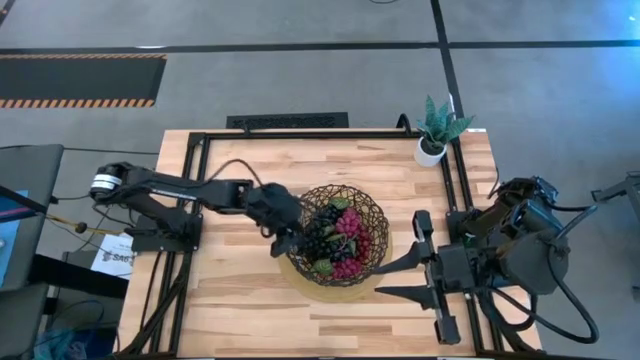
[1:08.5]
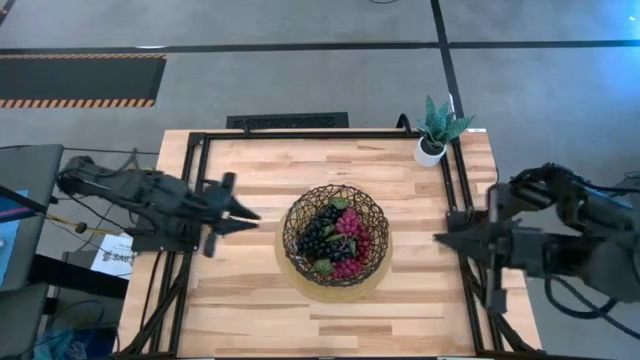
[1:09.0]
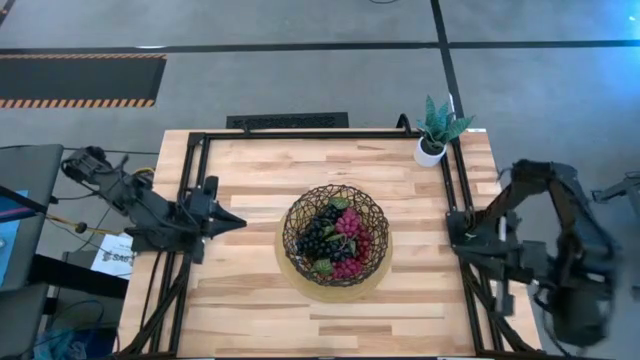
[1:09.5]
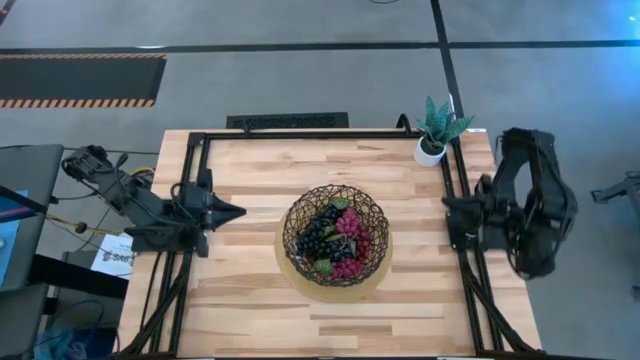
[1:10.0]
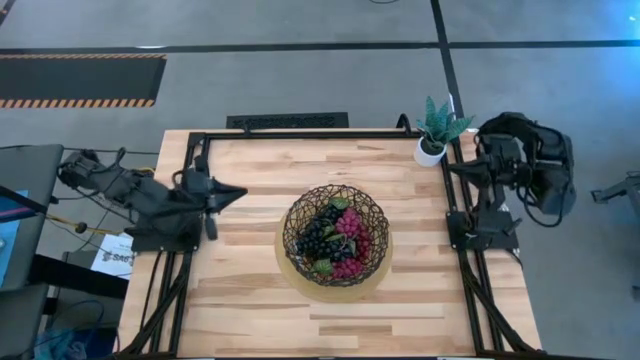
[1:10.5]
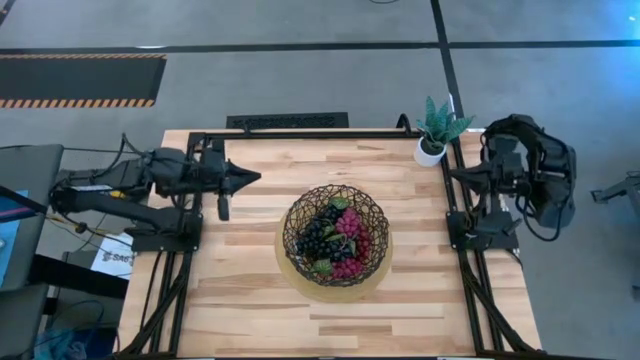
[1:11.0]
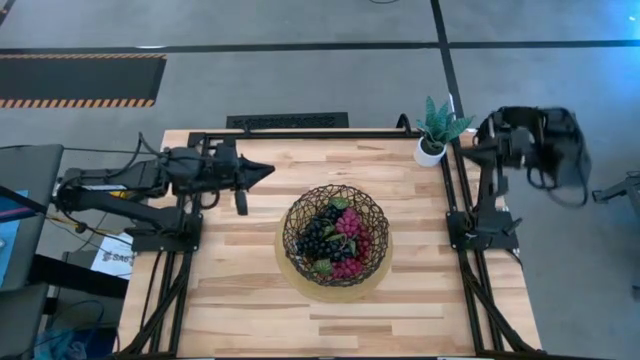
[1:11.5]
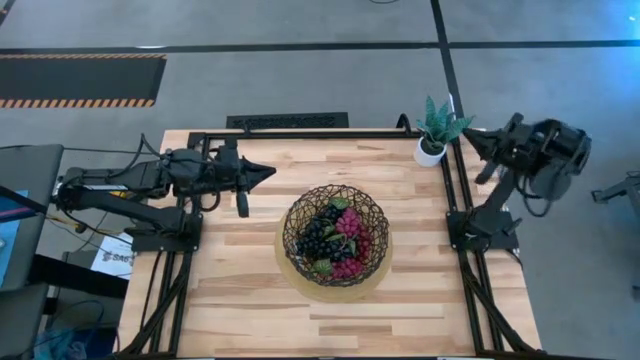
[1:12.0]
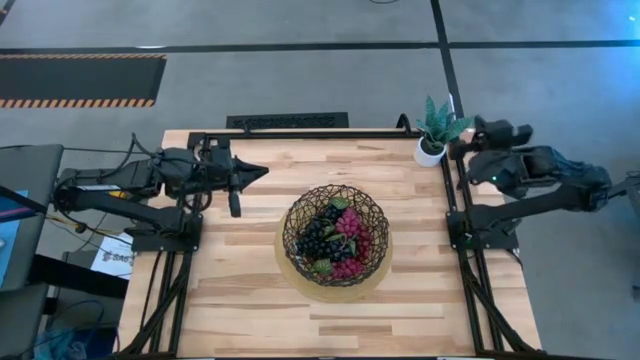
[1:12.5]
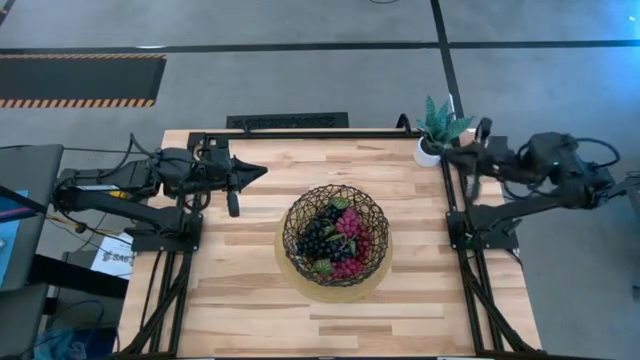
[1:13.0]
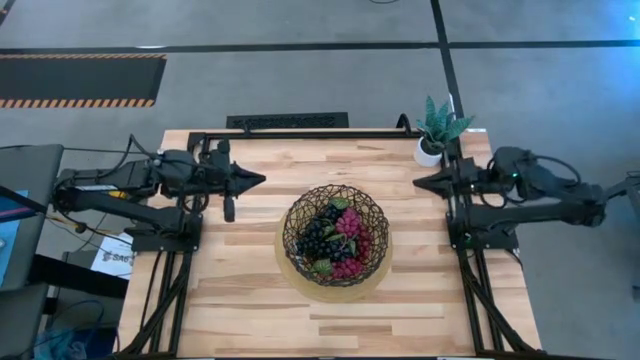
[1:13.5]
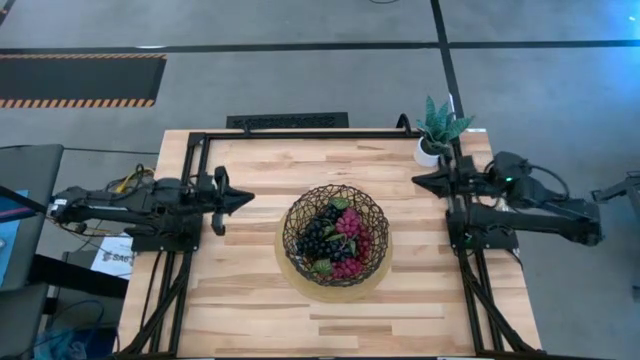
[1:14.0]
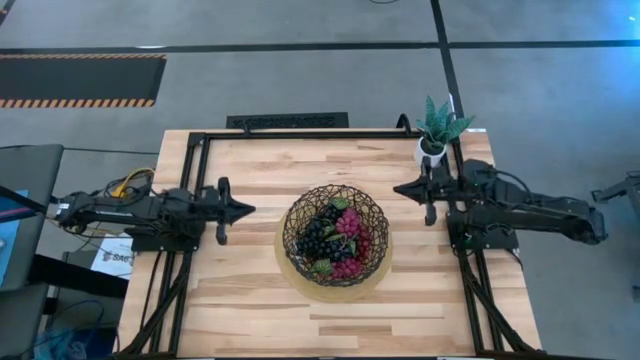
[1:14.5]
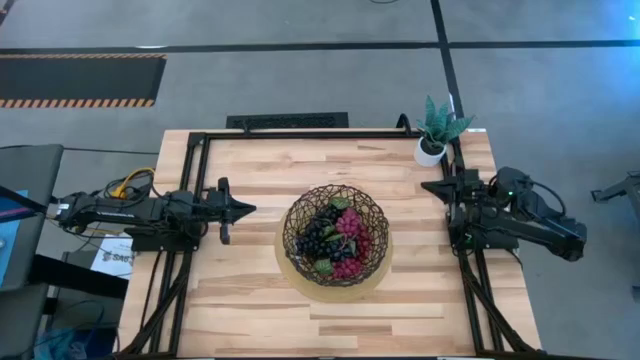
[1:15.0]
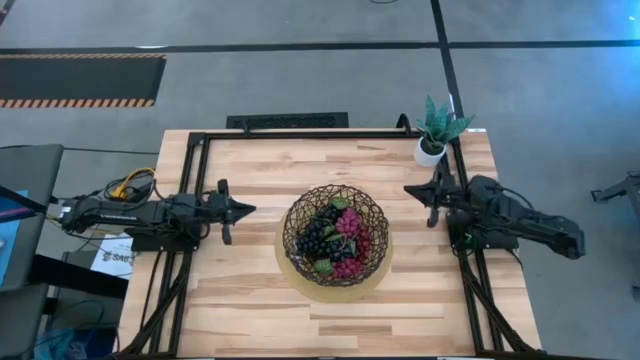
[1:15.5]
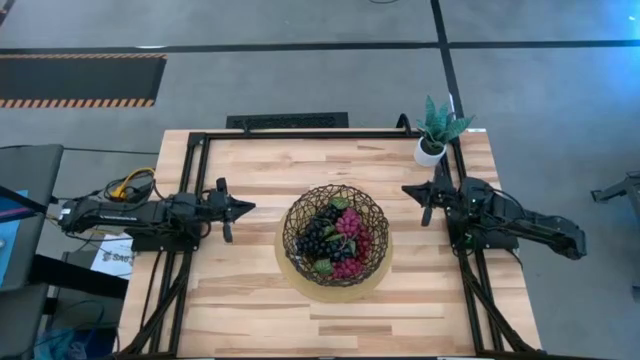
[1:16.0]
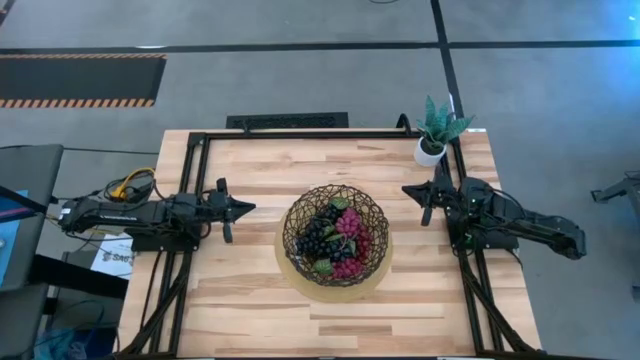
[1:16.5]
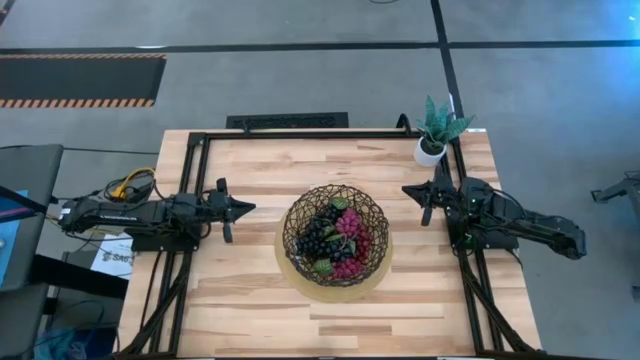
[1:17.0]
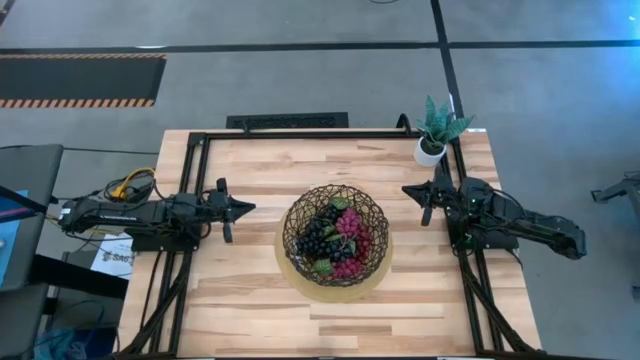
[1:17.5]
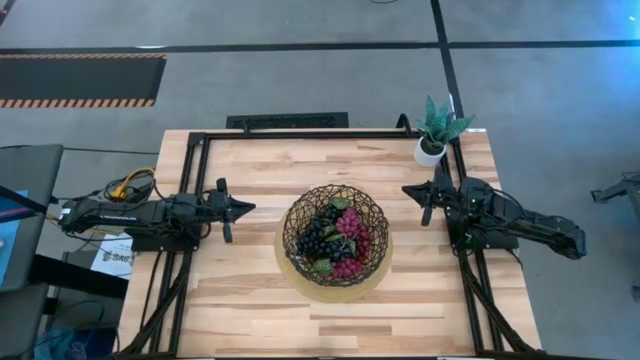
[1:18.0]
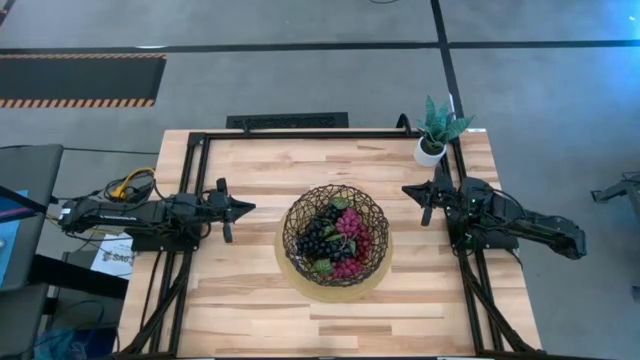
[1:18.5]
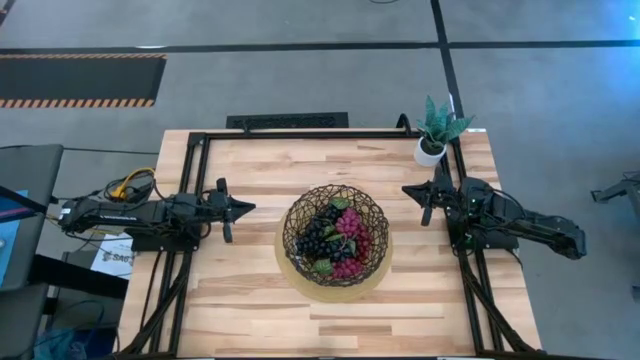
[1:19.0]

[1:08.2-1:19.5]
Task: Build produce basket
Return to Home Position

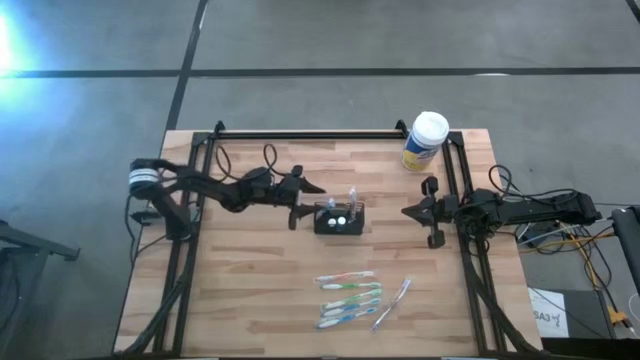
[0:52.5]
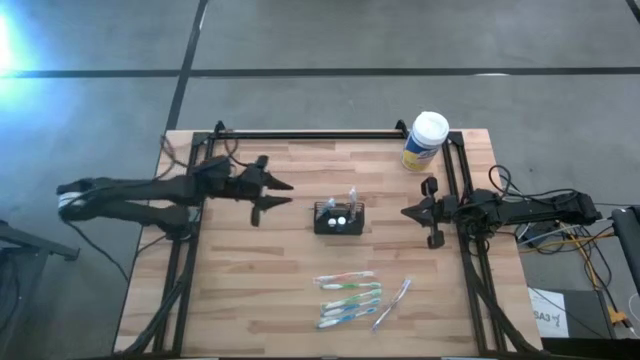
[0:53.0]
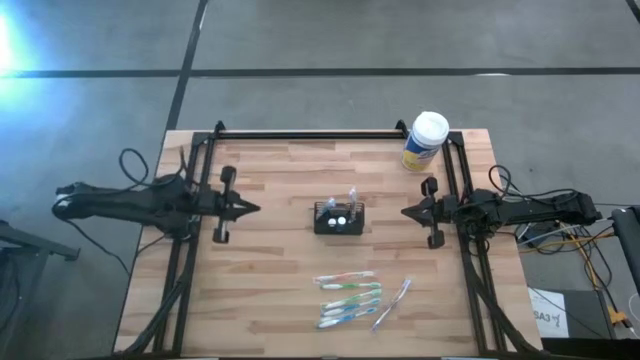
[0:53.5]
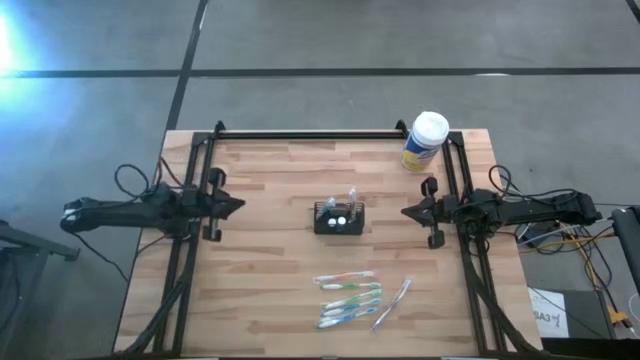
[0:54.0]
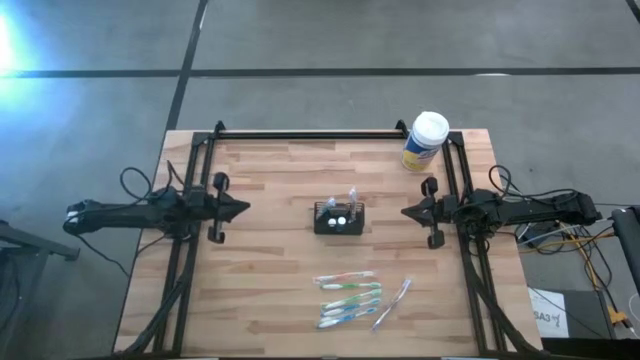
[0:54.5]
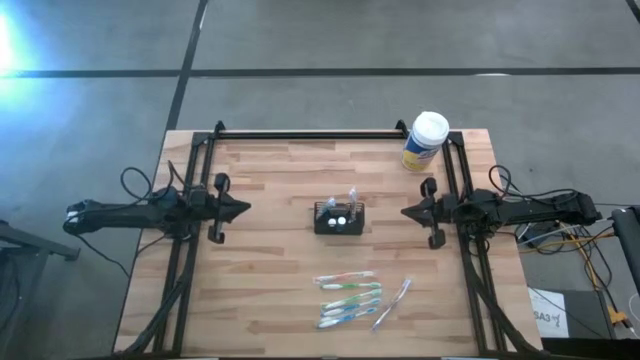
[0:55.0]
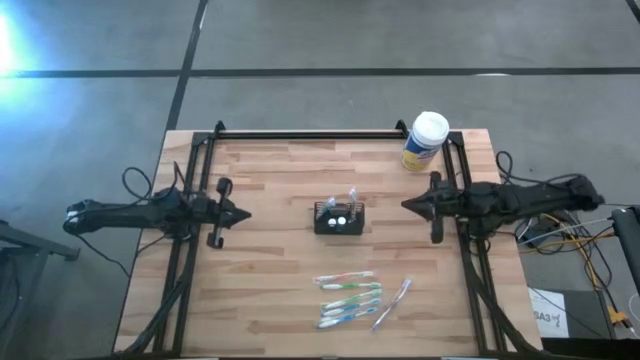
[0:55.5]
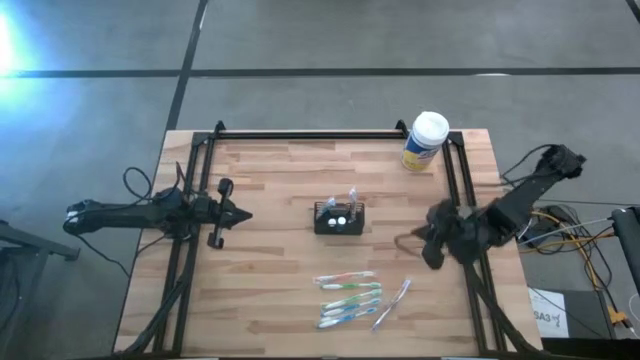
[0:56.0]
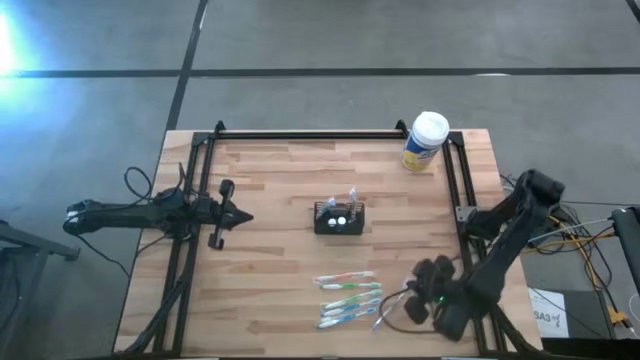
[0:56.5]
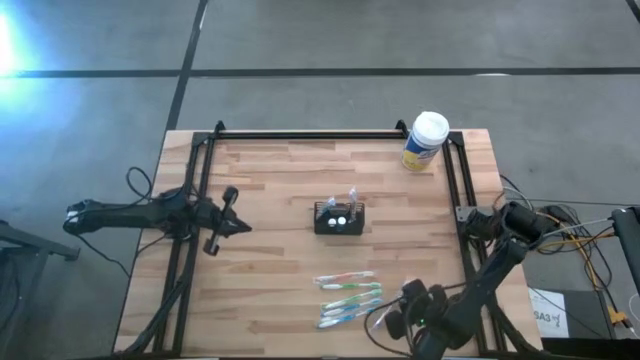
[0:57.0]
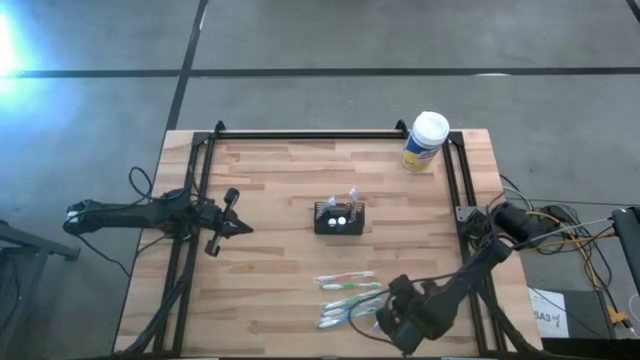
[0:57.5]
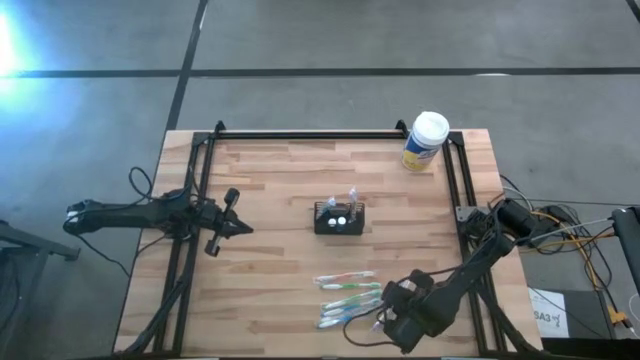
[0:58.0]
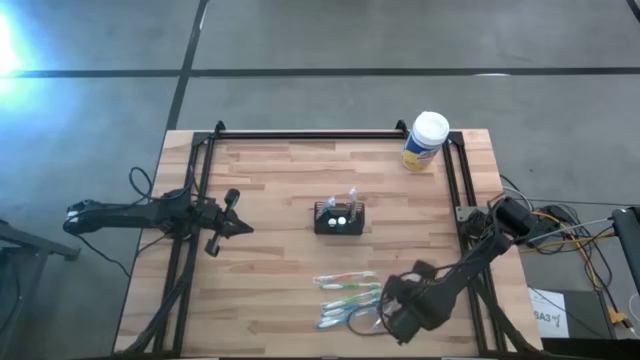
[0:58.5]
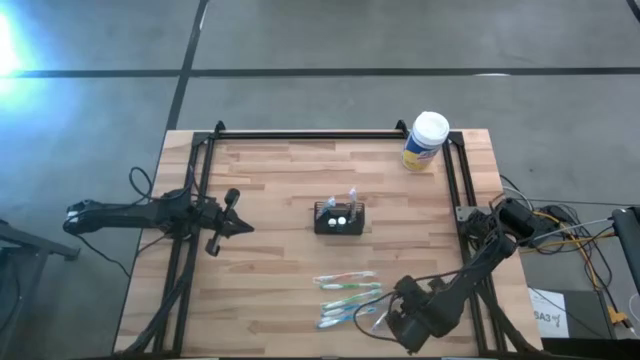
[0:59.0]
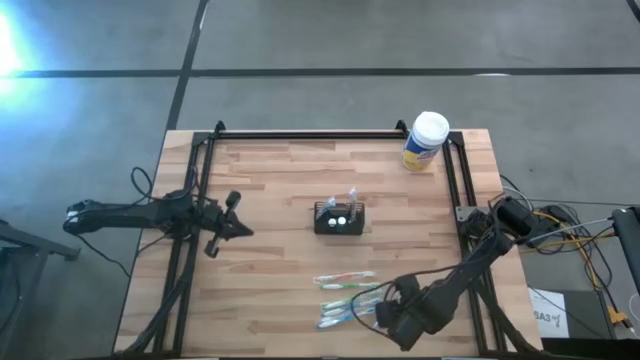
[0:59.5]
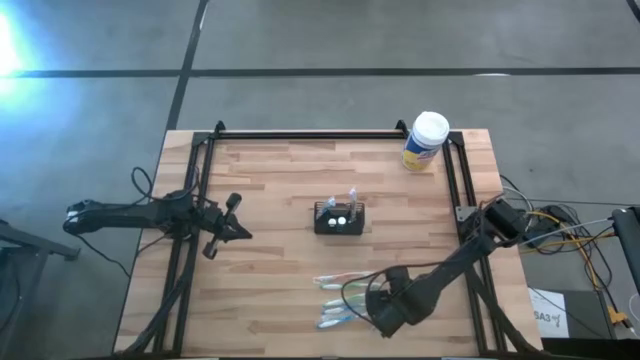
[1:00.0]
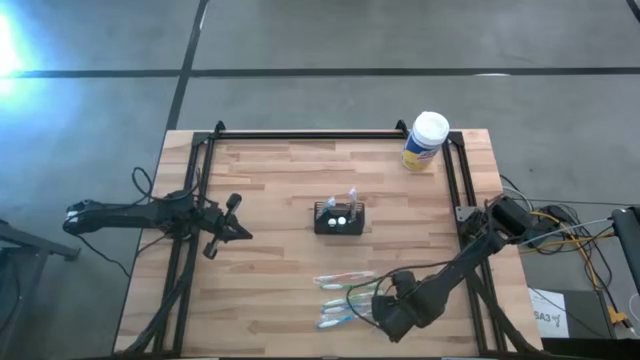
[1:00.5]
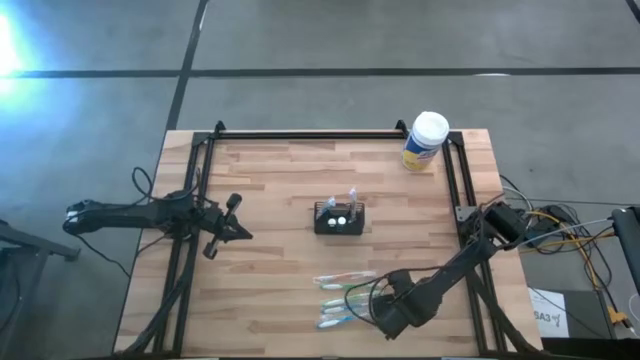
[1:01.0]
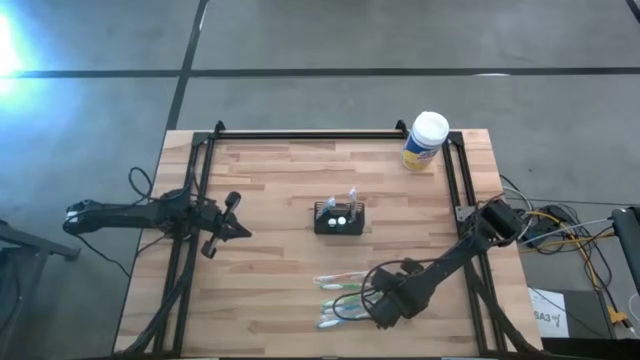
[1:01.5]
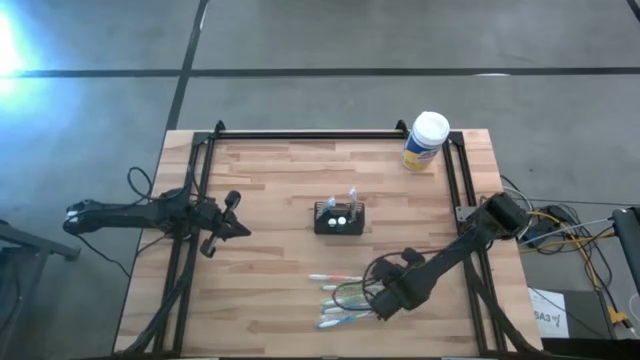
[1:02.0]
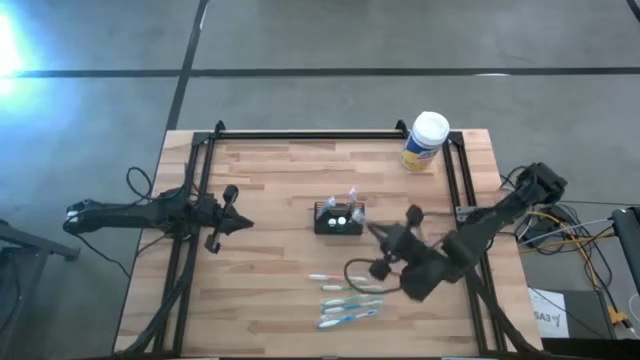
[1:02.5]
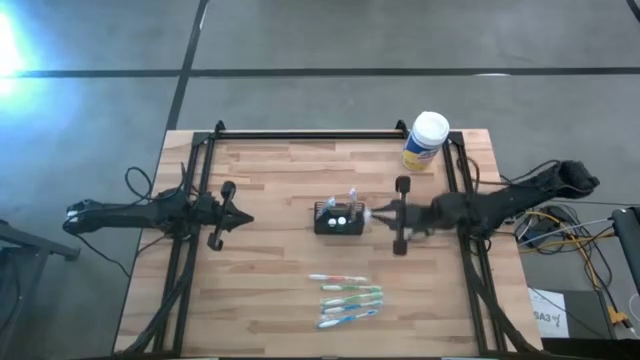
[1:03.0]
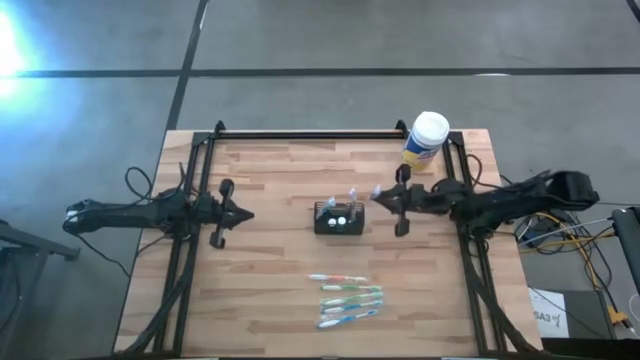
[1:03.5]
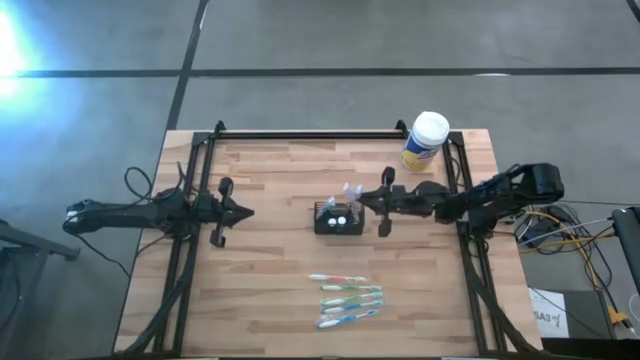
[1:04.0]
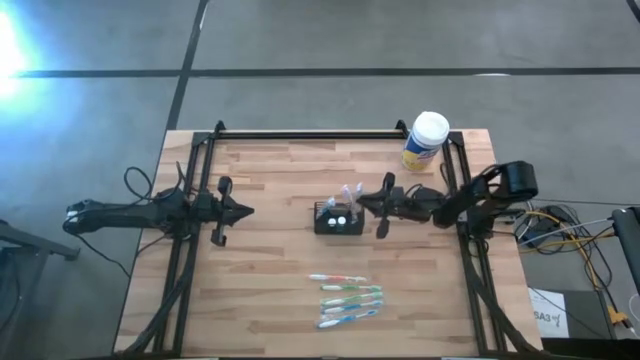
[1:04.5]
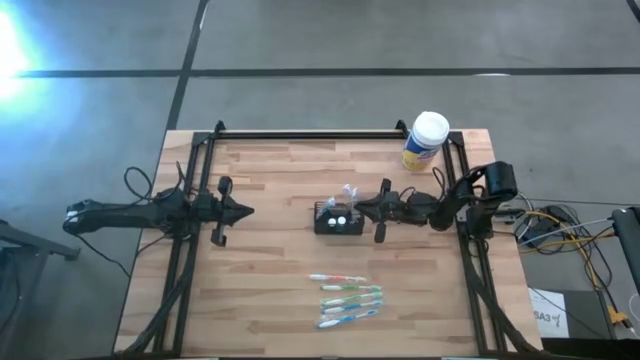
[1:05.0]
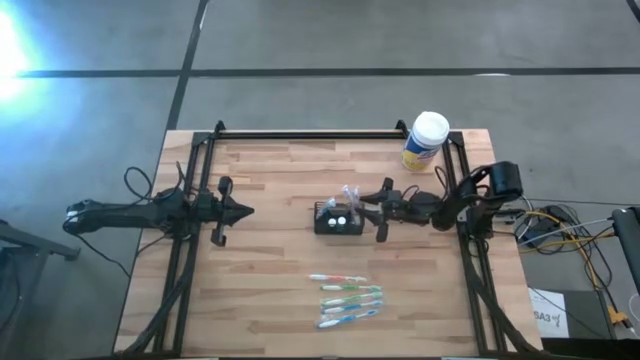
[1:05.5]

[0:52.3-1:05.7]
Task: Pick & Place toothbrushing station
Put the purple toothbrush into the wire organizer
